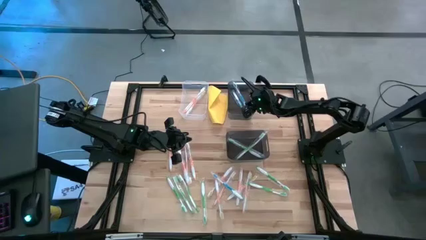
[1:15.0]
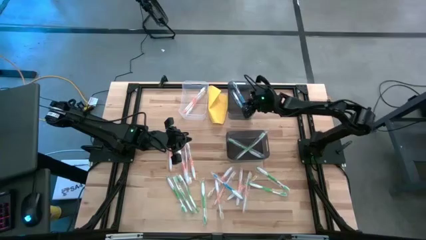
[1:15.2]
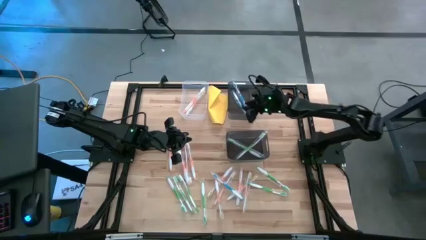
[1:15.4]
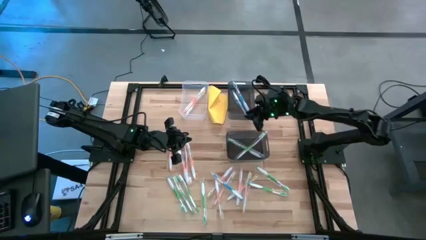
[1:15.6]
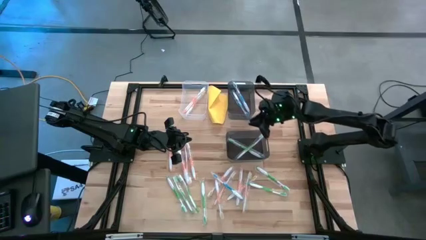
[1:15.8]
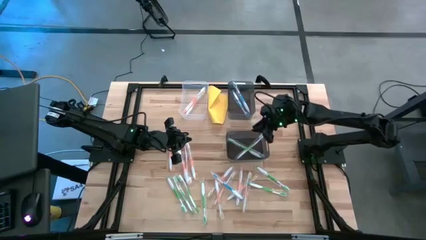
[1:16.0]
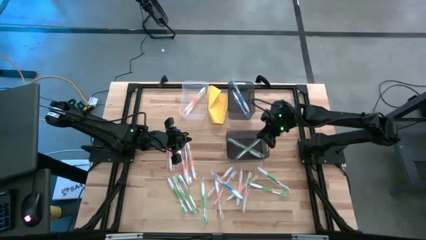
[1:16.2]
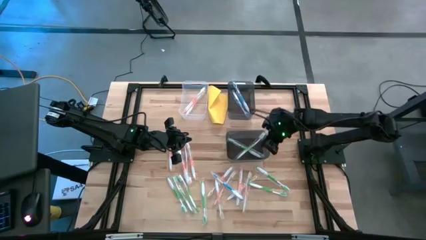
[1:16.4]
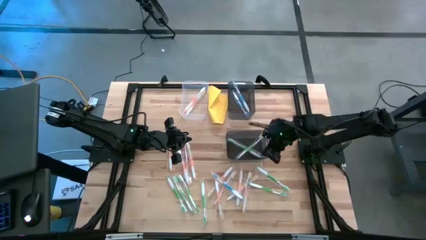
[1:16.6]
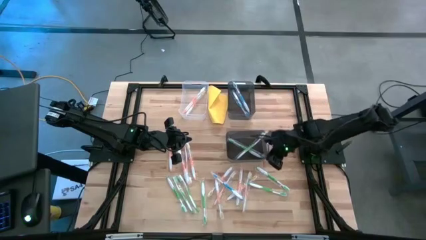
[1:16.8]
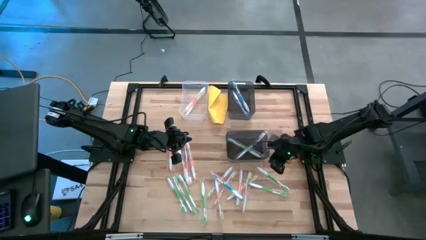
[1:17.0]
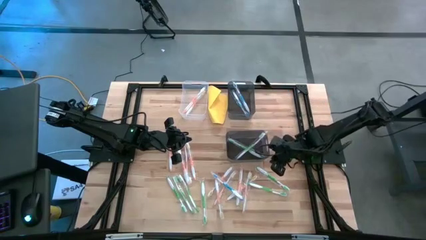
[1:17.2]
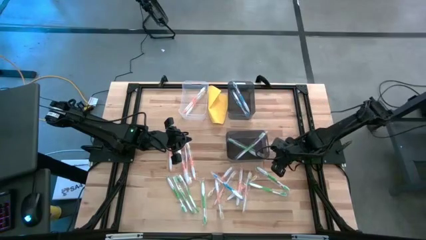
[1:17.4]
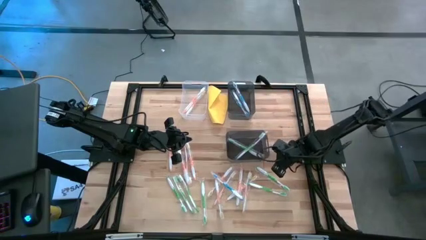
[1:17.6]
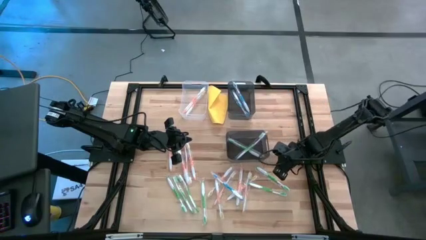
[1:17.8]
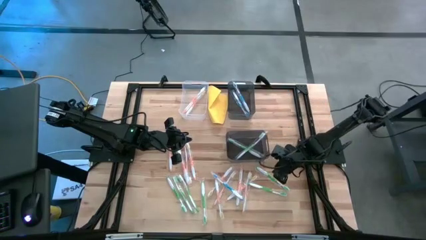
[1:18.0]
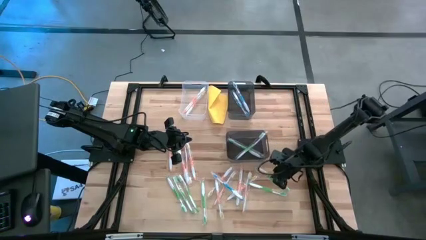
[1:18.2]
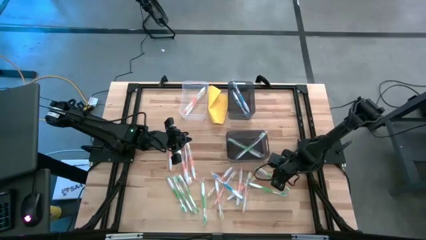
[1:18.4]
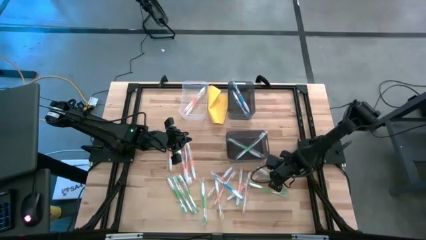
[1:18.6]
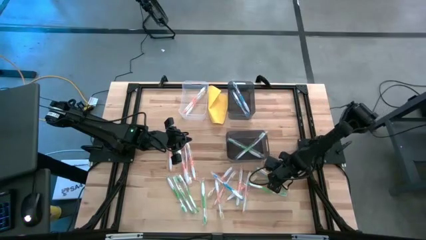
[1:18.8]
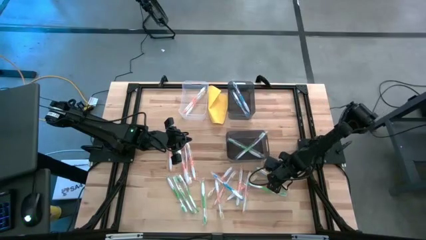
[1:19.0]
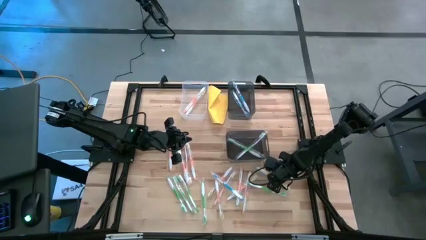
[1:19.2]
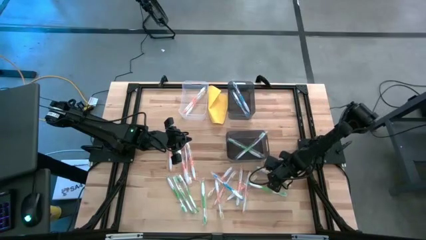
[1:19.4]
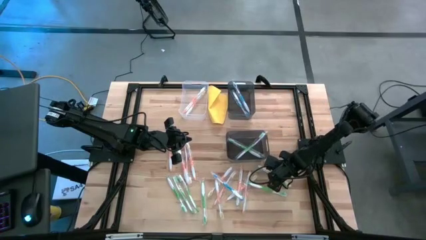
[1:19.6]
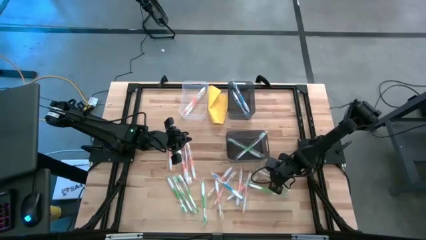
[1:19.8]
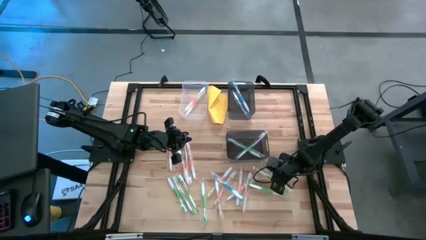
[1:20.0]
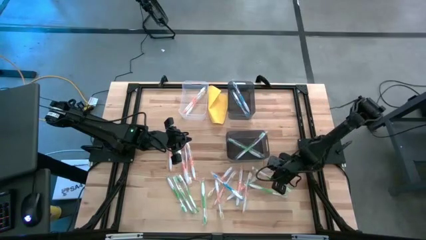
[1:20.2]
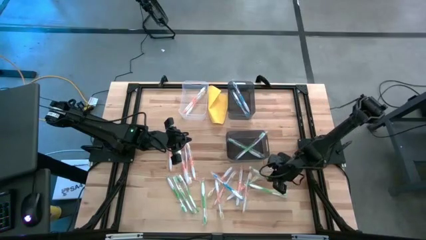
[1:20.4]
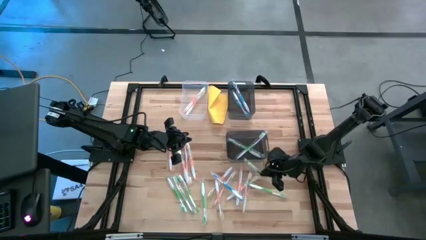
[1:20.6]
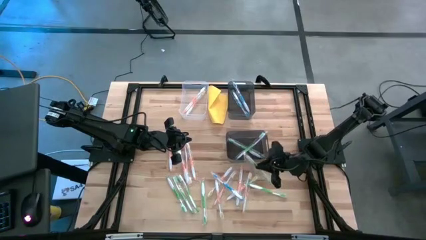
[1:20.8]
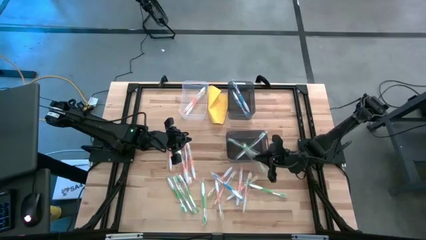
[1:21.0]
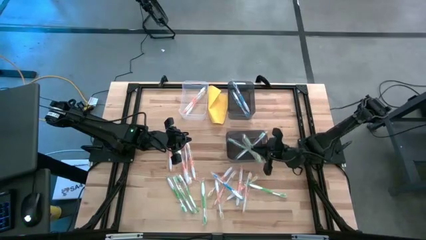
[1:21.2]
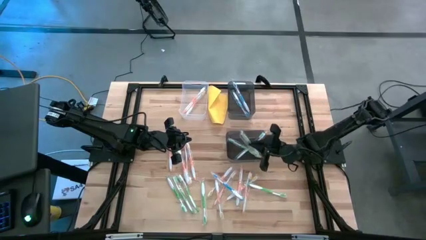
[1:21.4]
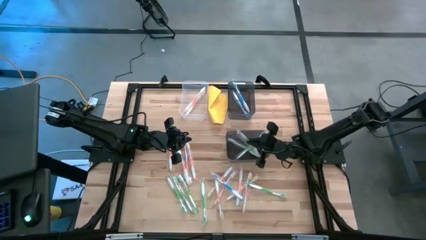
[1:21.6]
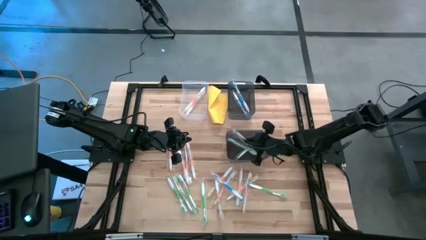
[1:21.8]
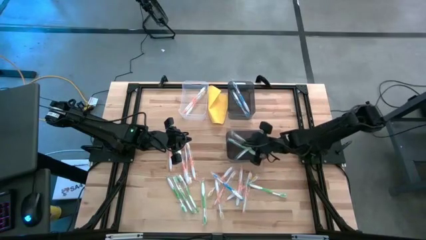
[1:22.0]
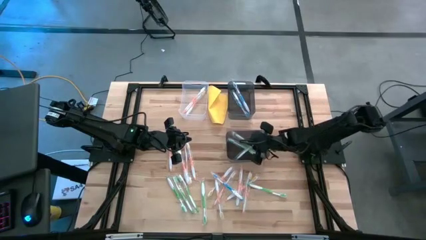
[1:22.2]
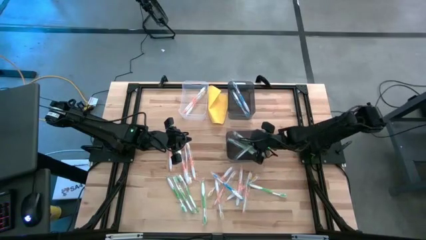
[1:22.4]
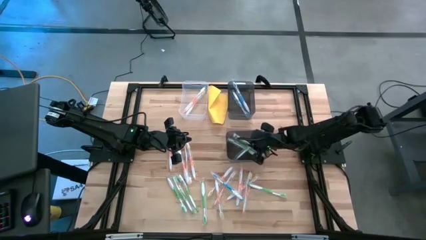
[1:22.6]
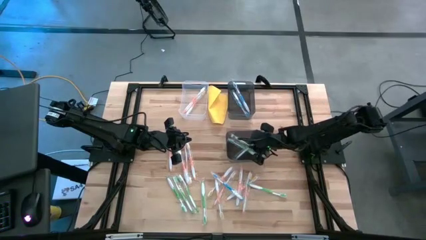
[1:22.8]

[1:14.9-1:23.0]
Task: Pick & Place Toothbrushes
Put the green toothbrush into the bottom black transparent bin

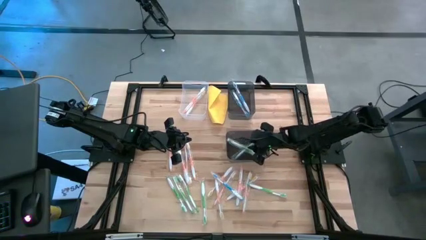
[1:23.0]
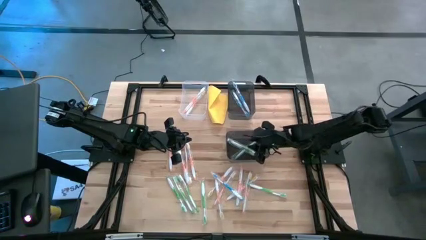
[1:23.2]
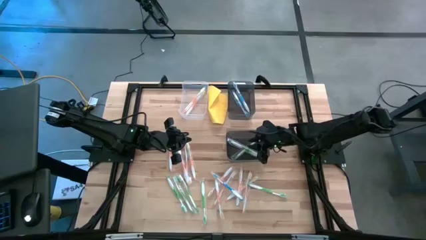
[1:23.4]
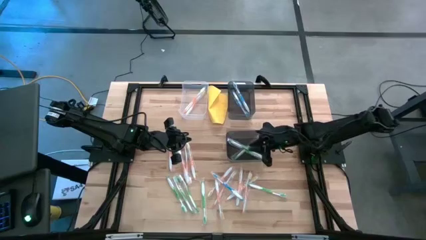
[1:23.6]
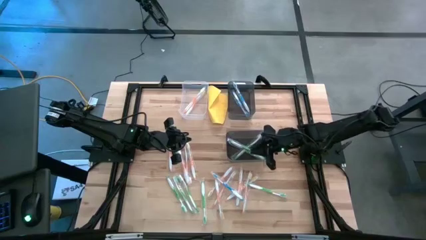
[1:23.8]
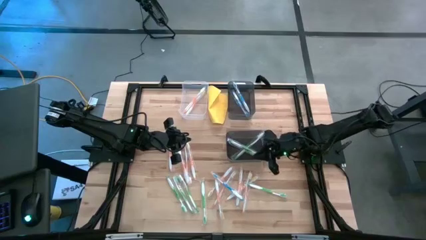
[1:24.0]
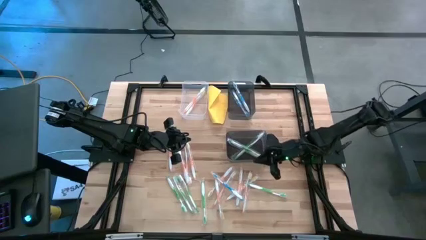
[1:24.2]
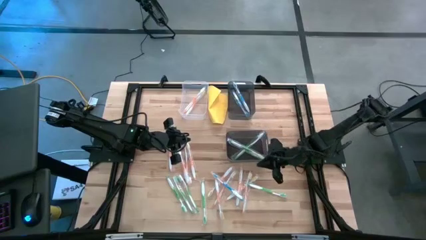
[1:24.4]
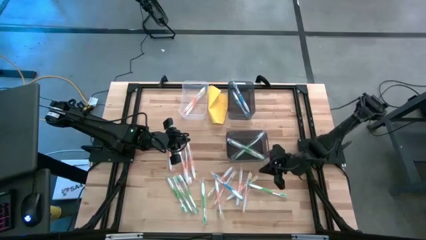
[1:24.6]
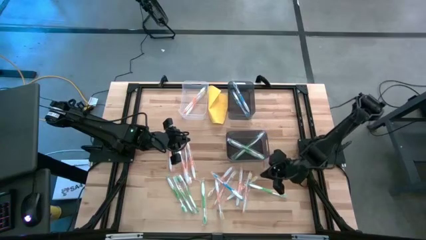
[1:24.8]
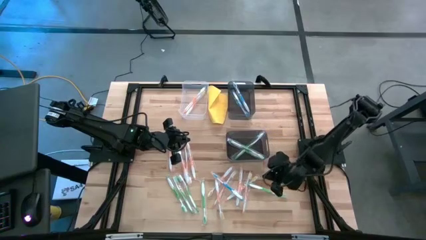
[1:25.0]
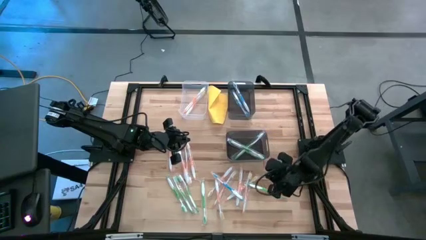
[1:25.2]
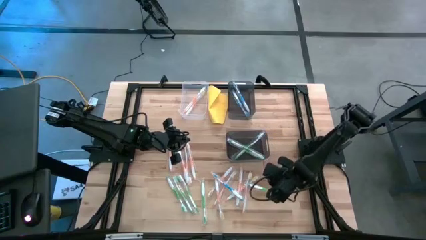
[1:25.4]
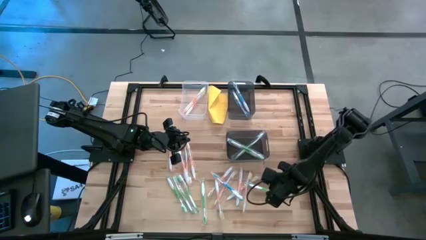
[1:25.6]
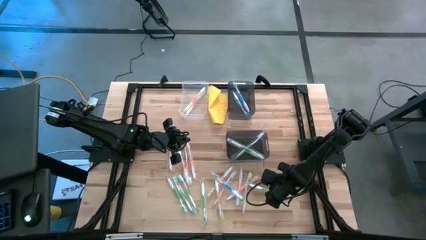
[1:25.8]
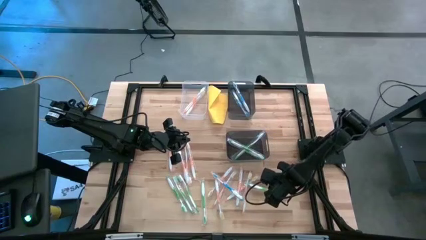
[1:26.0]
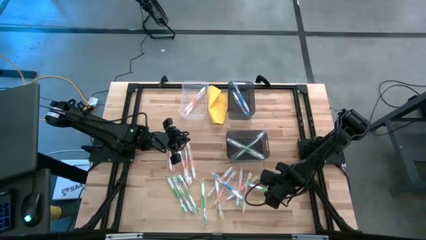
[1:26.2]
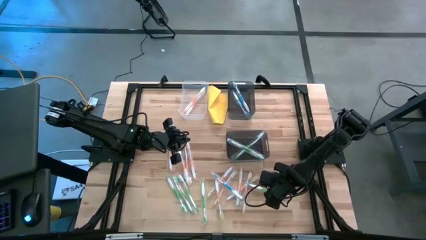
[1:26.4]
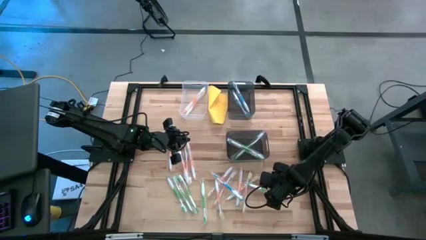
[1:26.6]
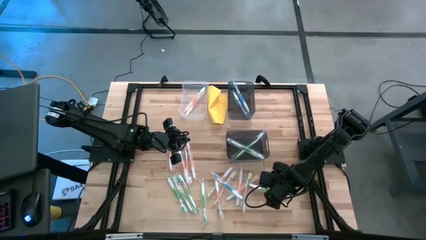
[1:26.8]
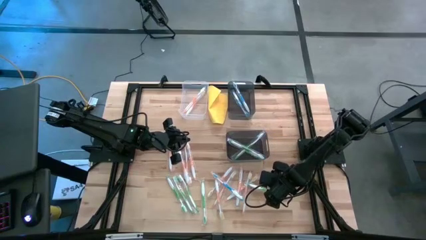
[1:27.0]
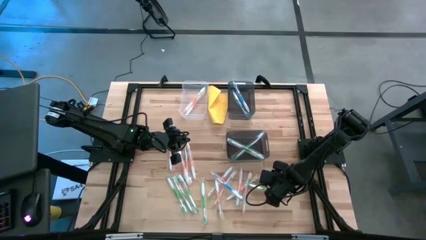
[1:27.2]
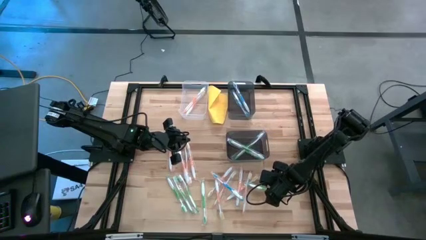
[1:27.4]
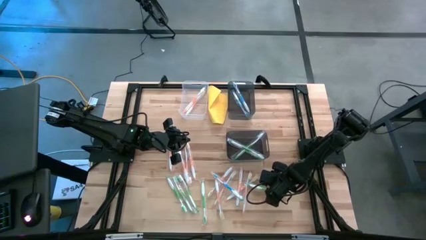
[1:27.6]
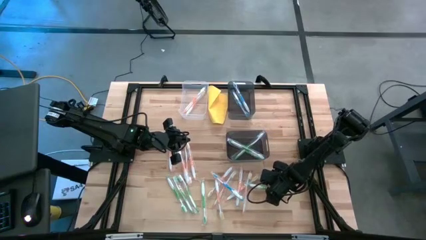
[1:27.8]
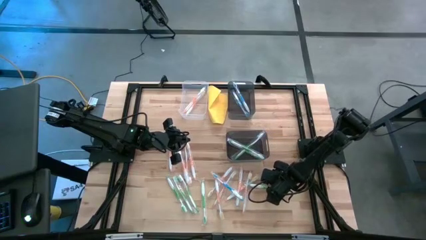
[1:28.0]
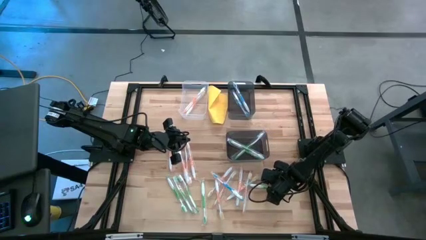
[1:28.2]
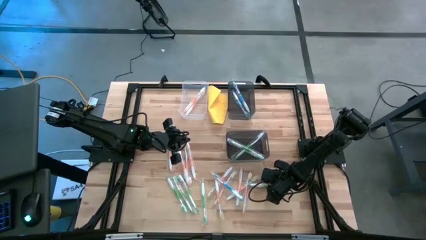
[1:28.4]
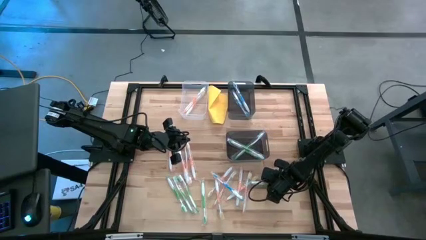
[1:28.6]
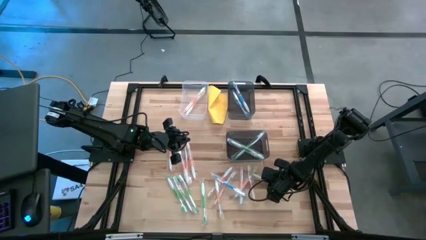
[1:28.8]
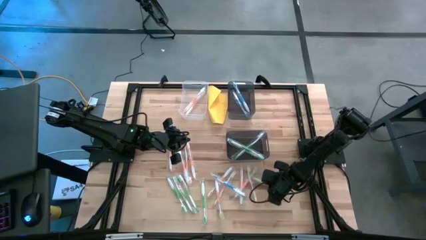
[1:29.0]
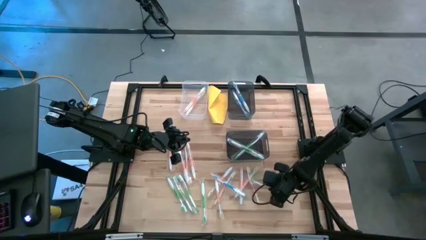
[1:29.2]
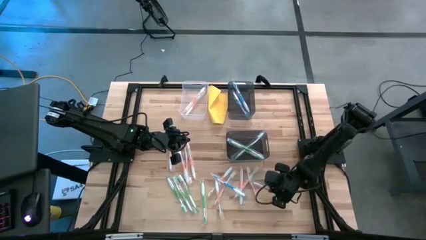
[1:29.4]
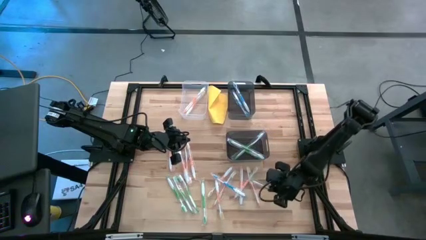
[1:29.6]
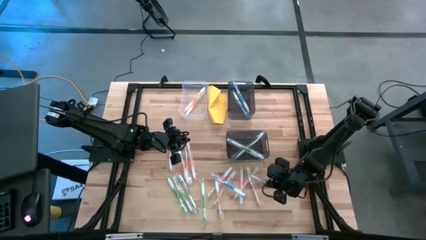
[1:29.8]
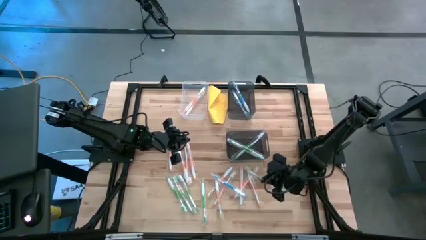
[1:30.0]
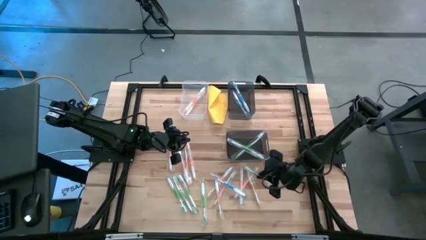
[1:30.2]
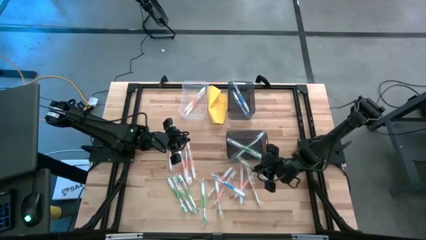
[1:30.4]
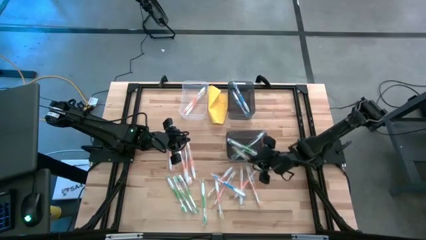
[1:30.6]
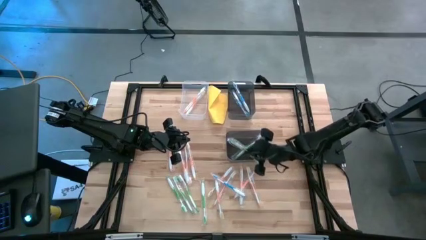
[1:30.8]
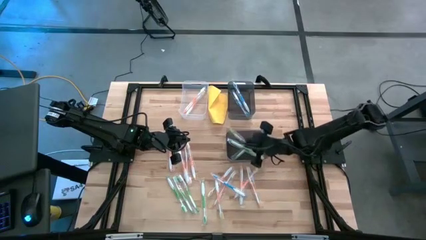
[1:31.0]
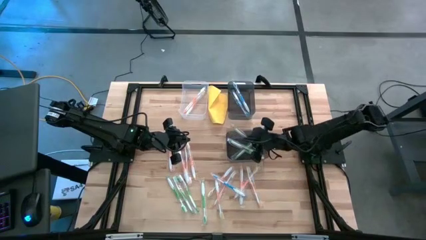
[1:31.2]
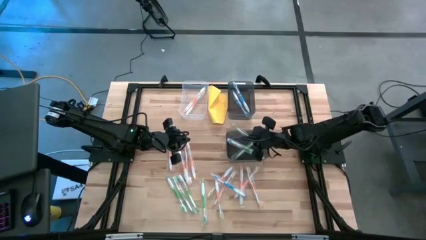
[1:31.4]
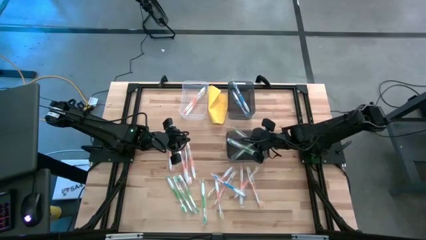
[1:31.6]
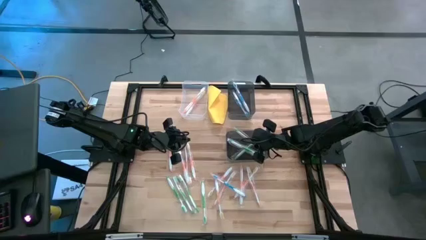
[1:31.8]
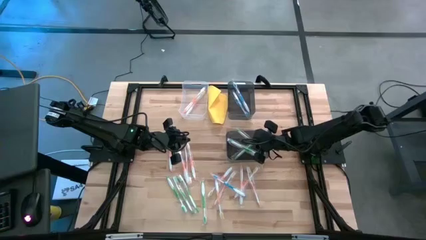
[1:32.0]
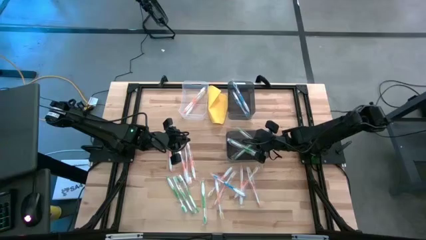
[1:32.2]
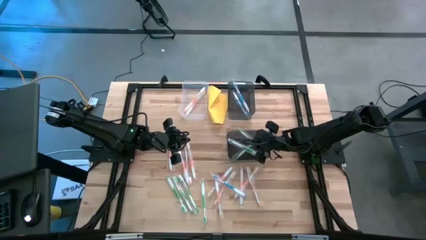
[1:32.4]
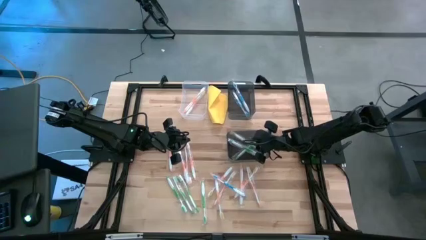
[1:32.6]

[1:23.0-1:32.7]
Put the green toothbrush into the bottom black transparent bin
